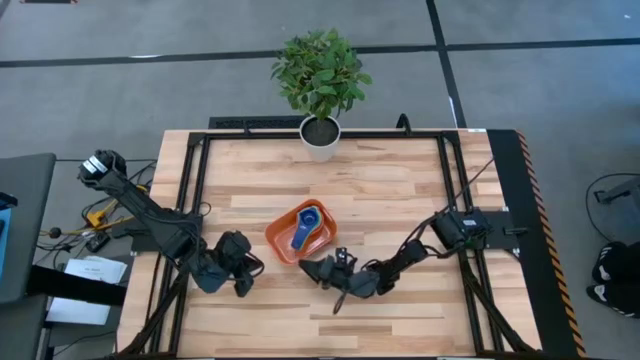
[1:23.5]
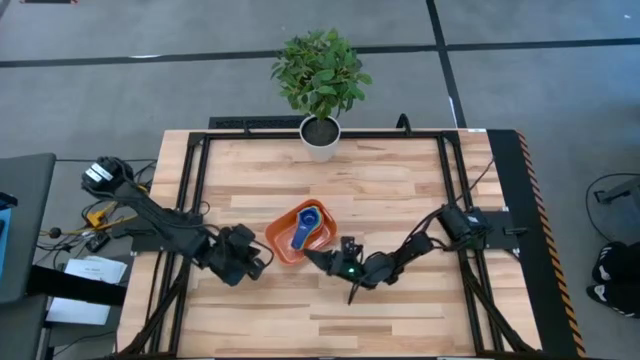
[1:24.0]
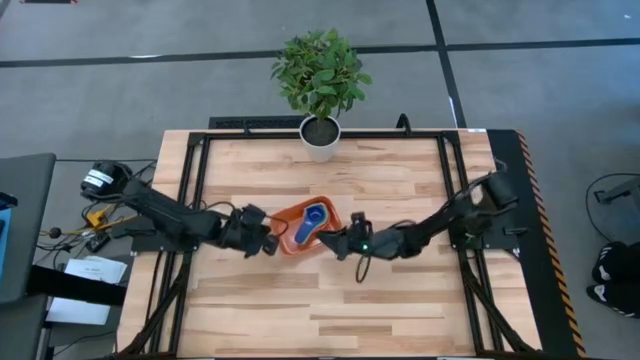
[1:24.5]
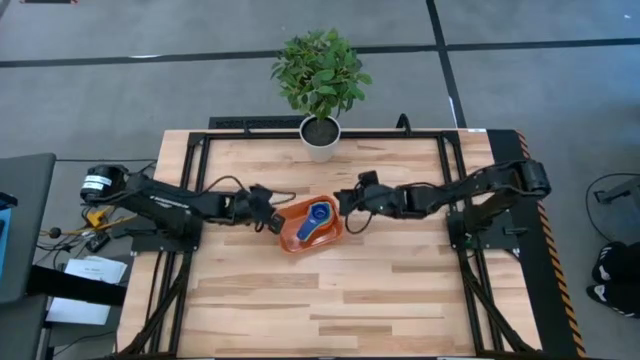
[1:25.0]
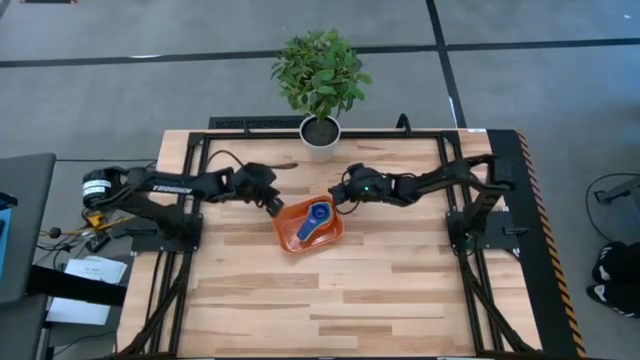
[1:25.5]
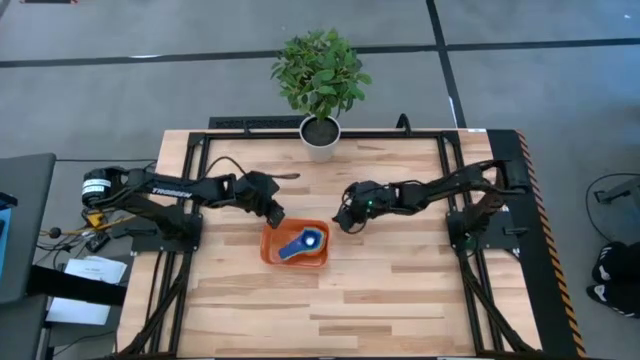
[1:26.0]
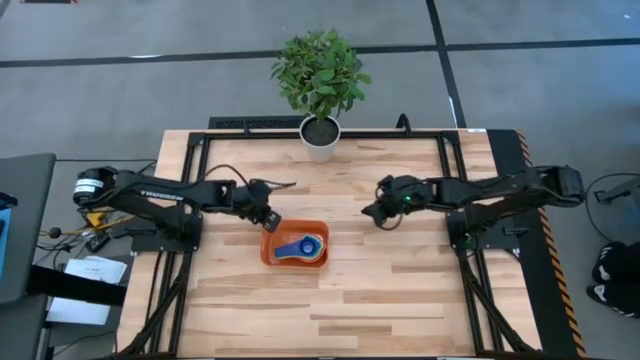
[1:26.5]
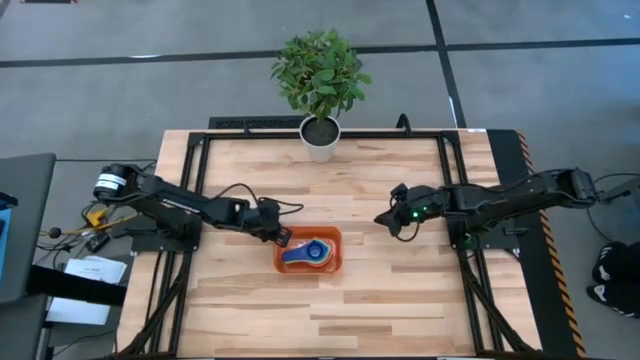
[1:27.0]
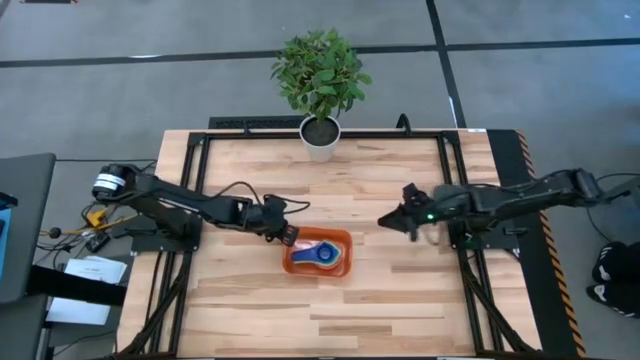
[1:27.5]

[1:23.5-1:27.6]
Task: Nest measuring cups in basket
Adjust the orange bin

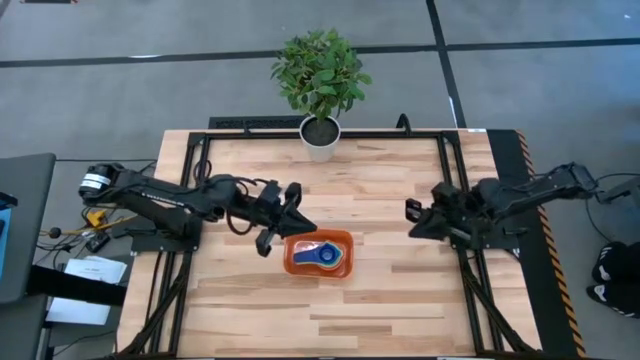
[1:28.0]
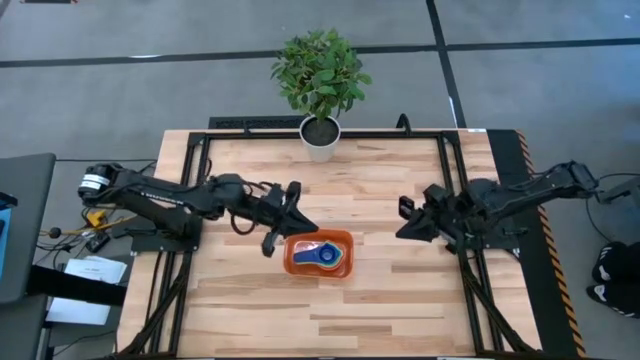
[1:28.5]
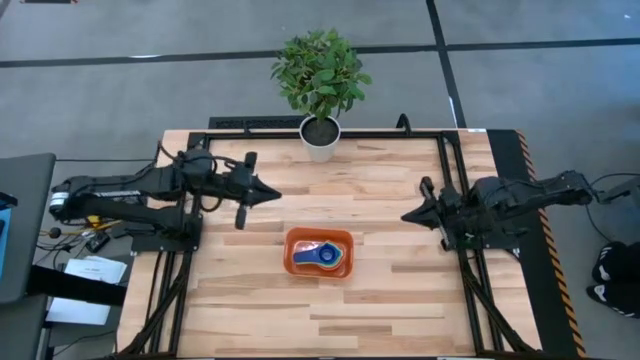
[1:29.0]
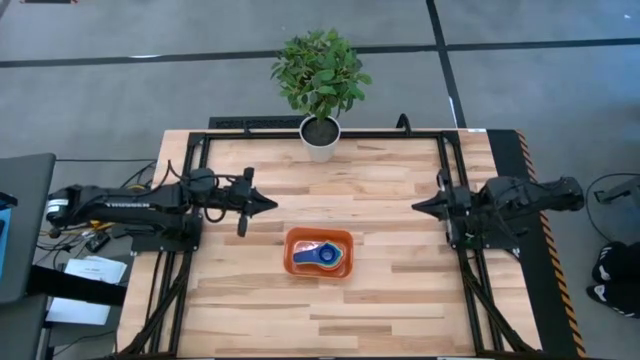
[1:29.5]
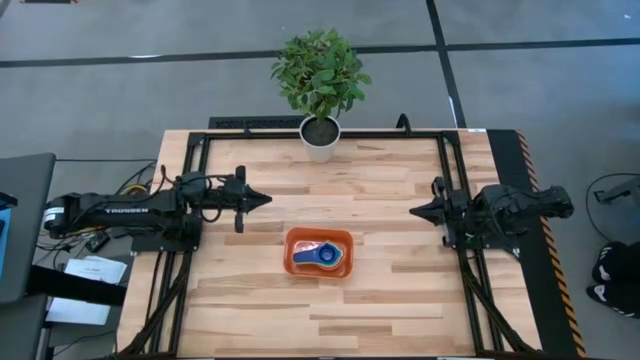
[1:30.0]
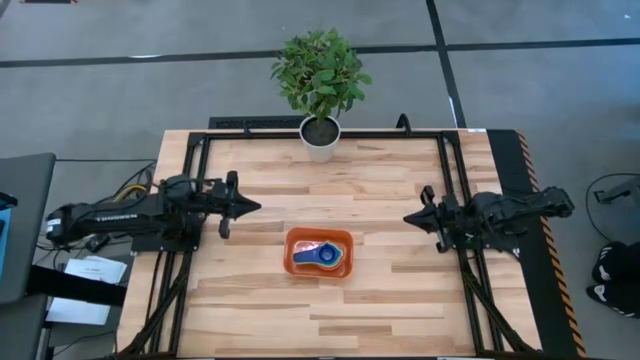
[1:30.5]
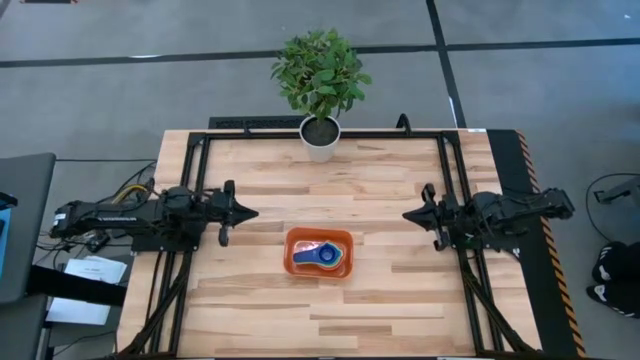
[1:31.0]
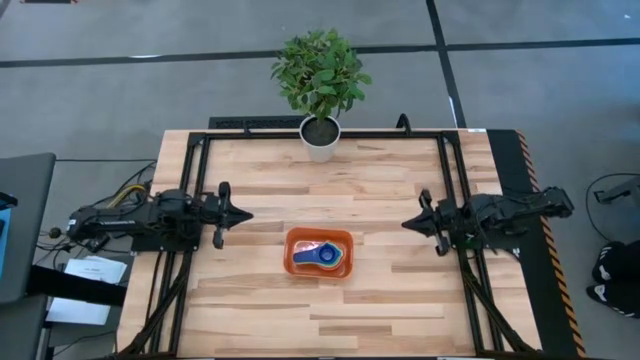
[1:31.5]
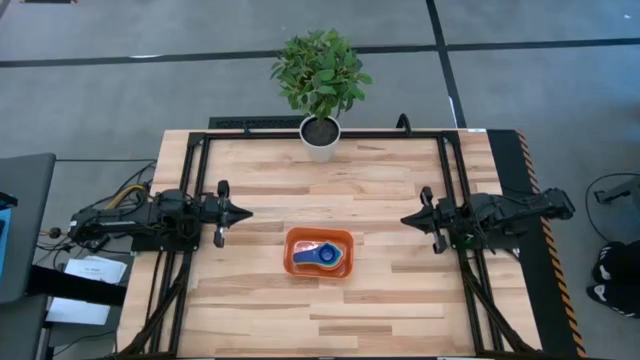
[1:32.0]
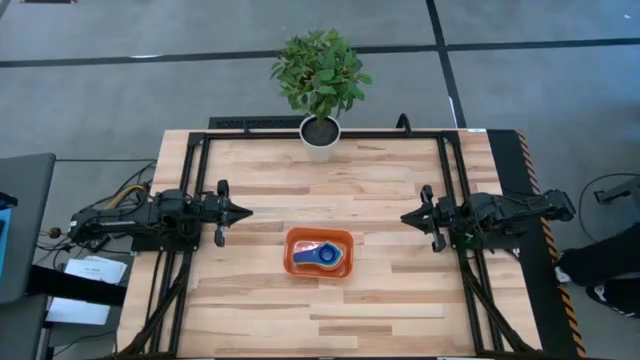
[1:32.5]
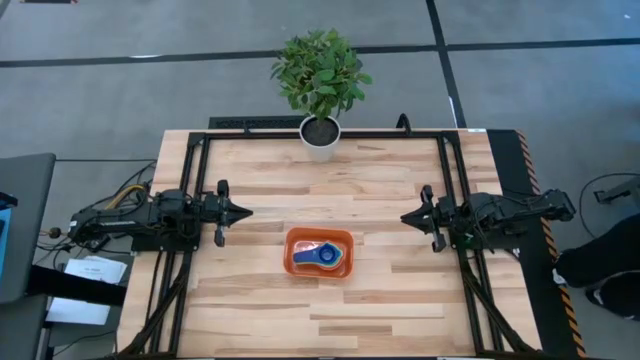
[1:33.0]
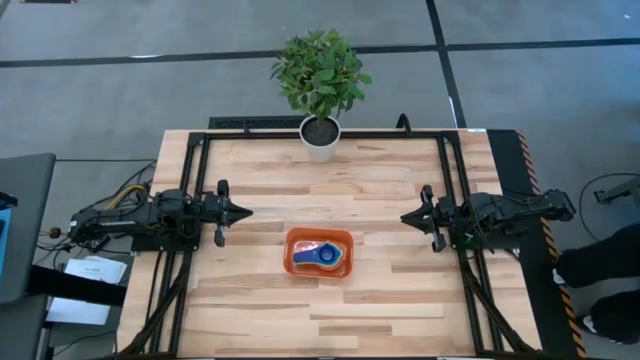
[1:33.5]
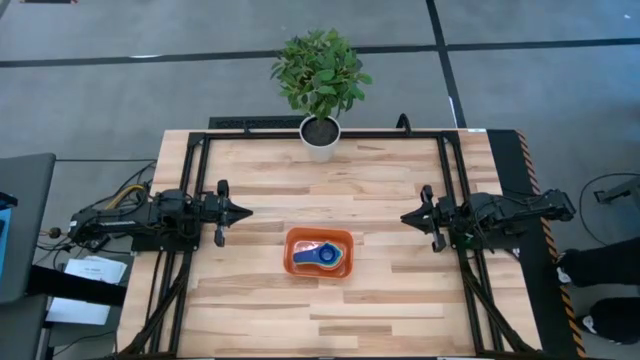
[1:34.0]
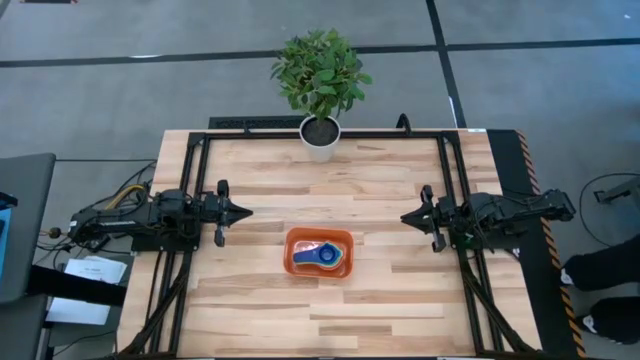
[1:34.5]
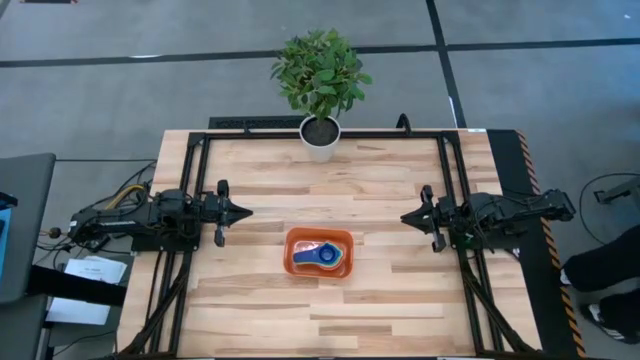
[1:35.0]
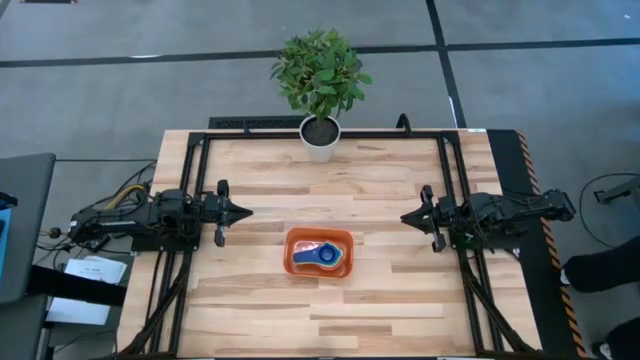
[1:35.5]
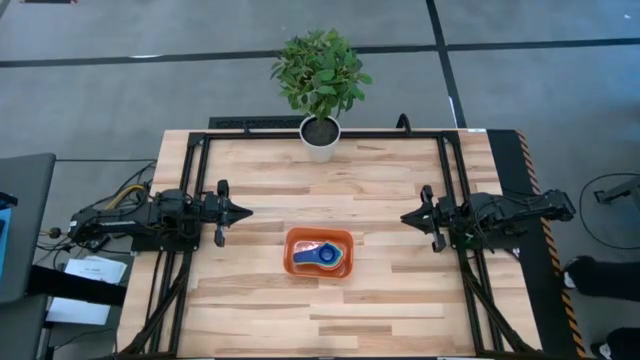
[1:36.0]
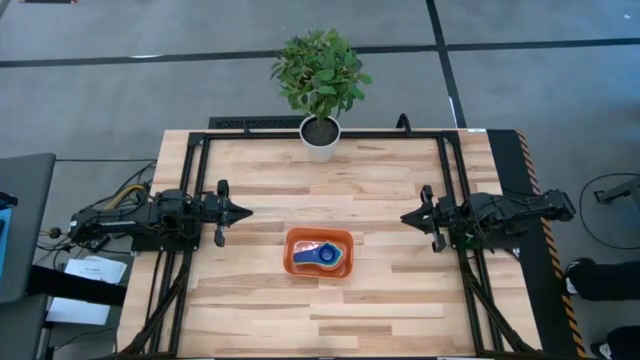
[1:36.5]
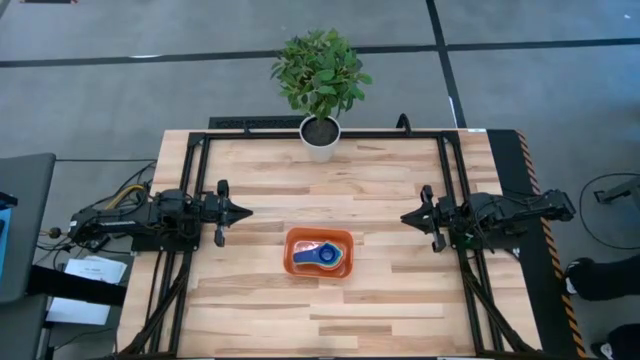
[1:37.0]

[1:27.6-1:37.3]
Return to Home Position

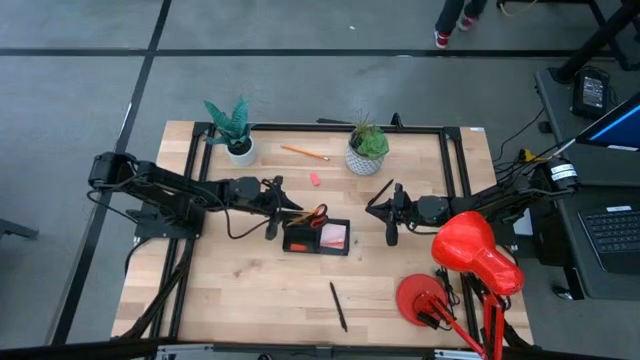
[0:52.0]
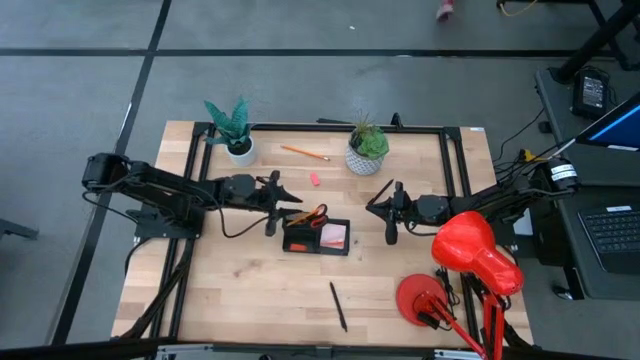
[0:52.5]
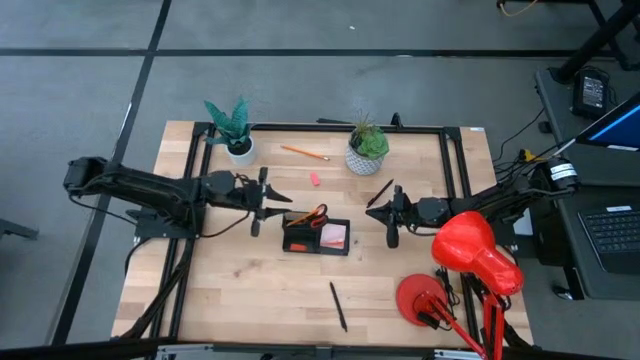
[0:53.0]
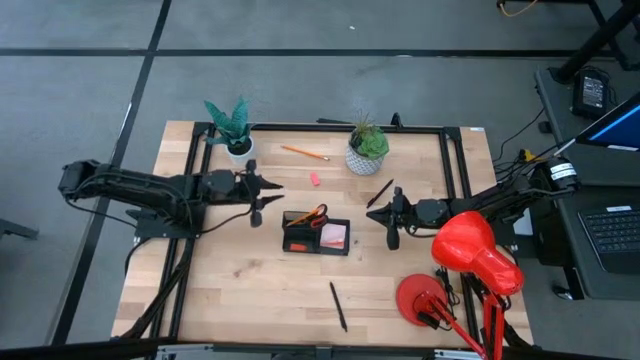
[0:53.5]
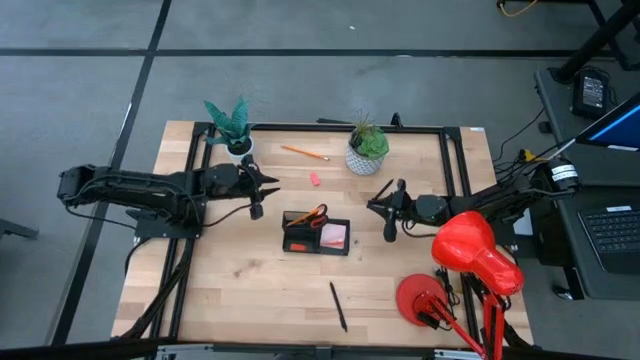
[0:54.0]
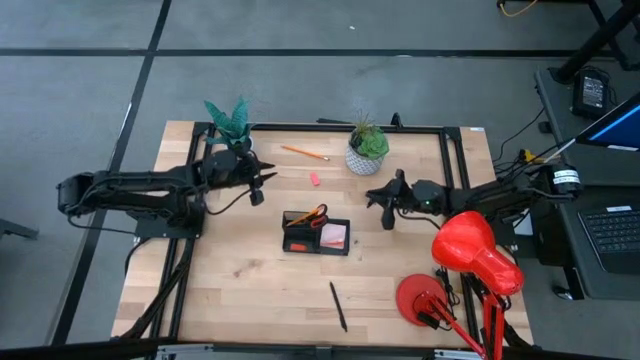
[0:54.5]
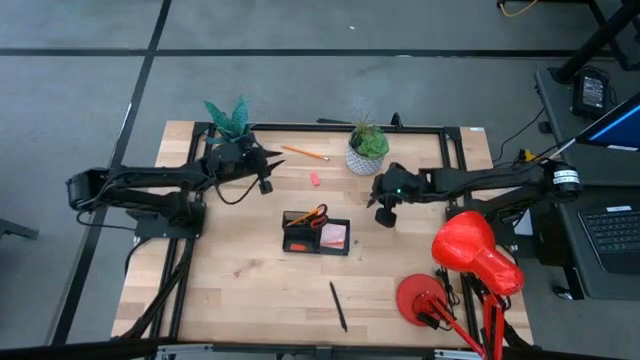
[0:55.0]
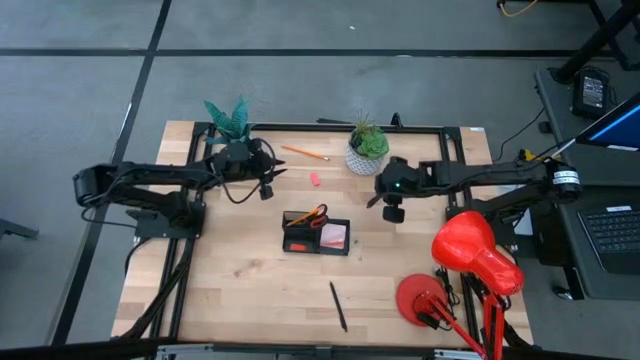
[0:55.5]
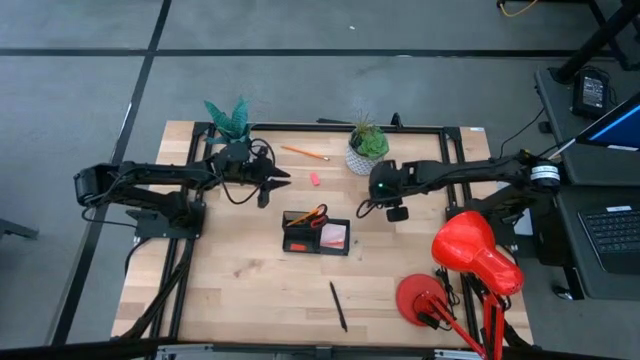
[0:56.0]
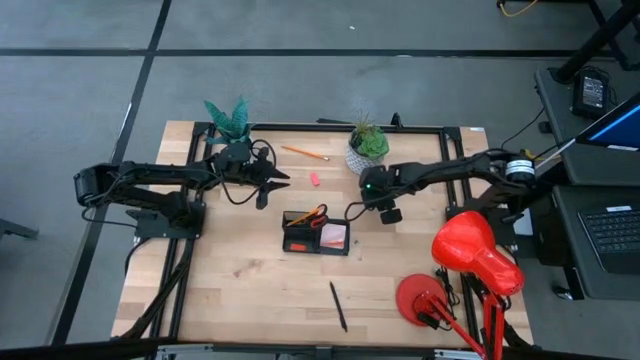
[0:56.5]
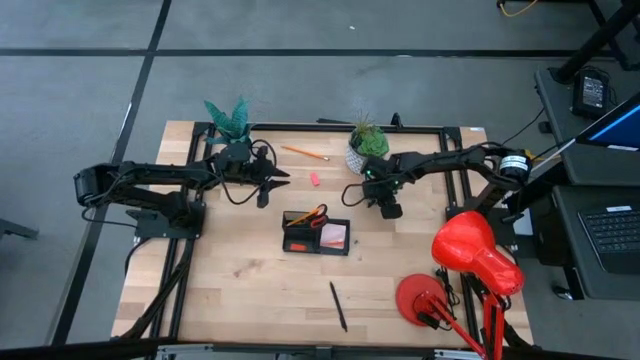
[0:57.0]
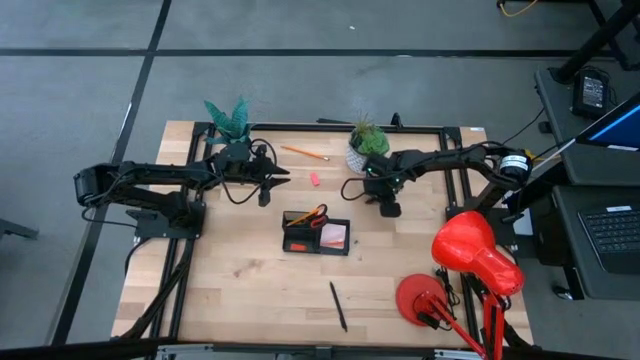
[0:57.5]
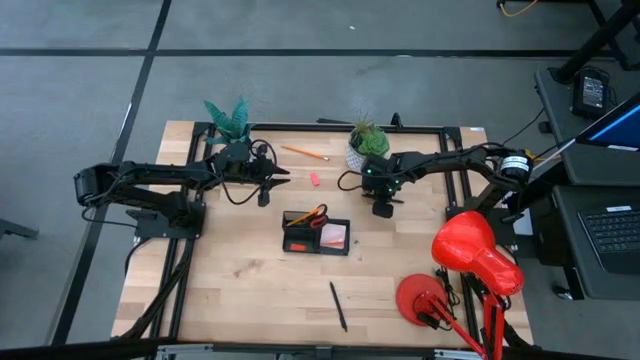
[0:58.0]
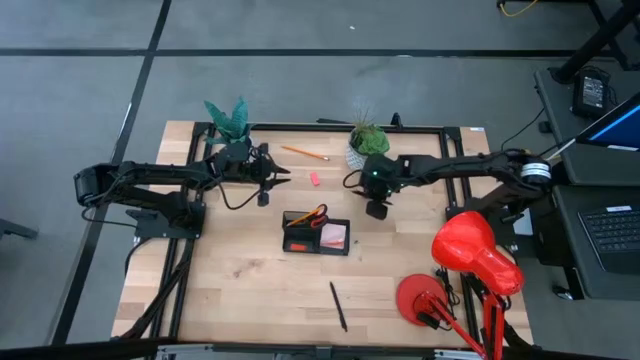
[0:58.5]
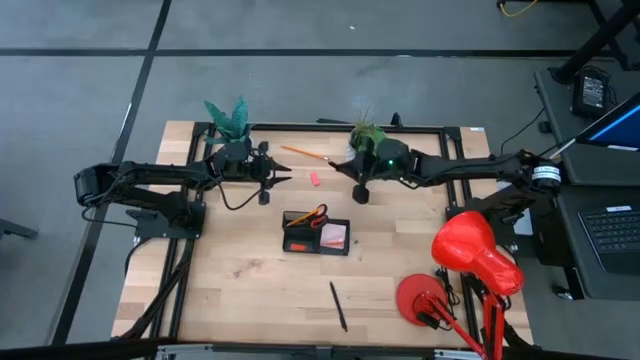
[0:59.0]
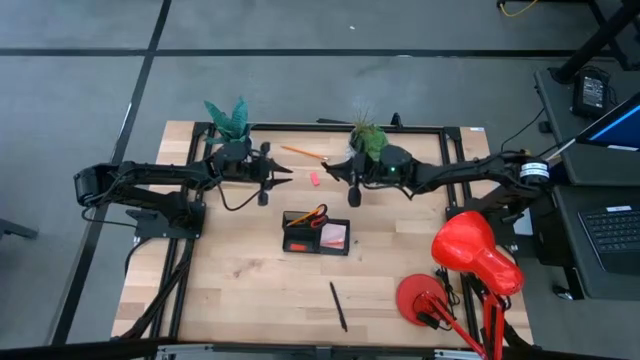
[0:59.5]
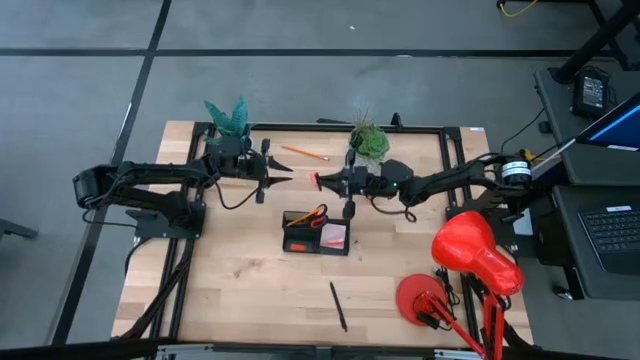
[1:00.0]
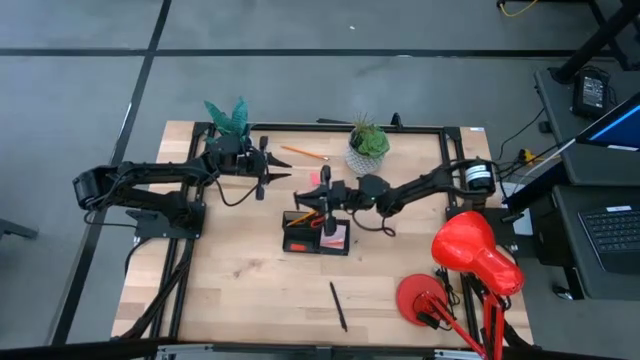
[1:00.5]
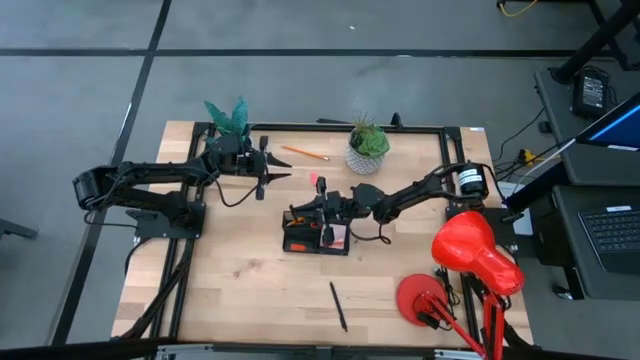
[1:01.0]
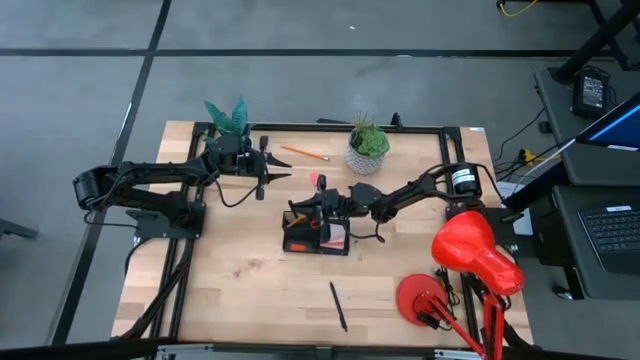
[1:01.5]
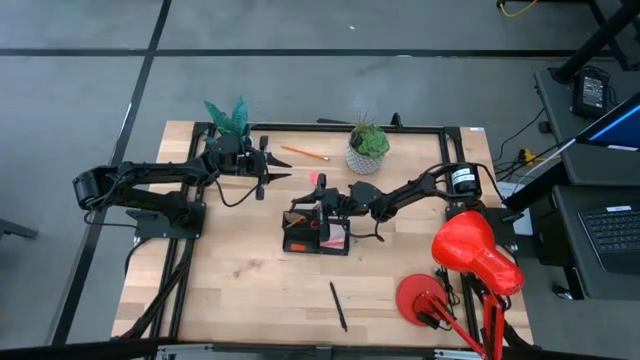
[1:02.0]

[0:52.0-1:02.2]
Task: Pick and place office supplies into organizer
Put the top black pen into the desk organizer
